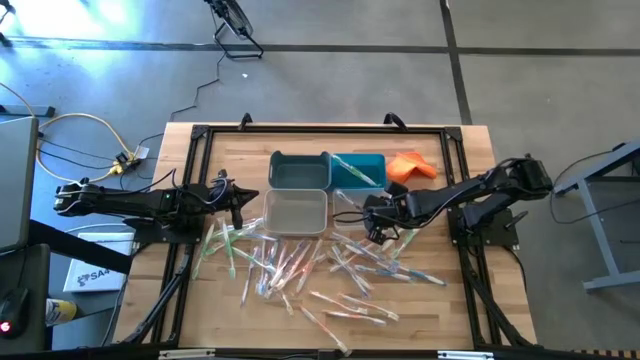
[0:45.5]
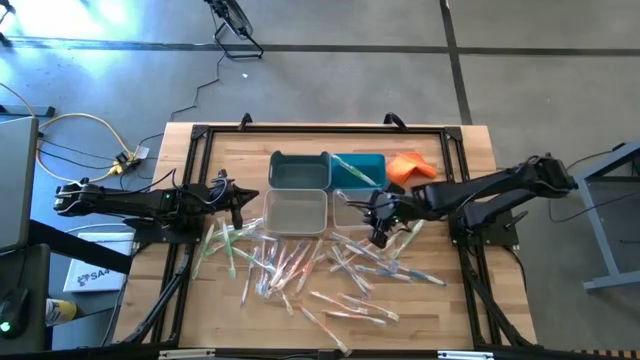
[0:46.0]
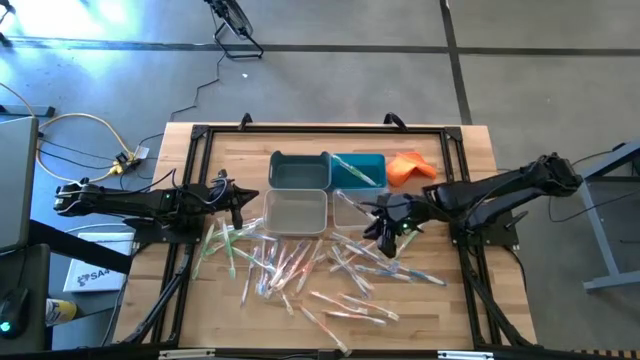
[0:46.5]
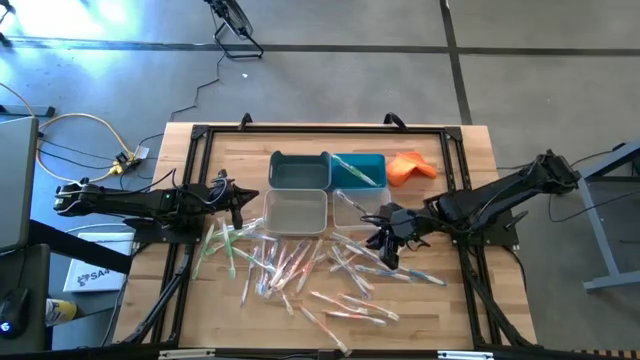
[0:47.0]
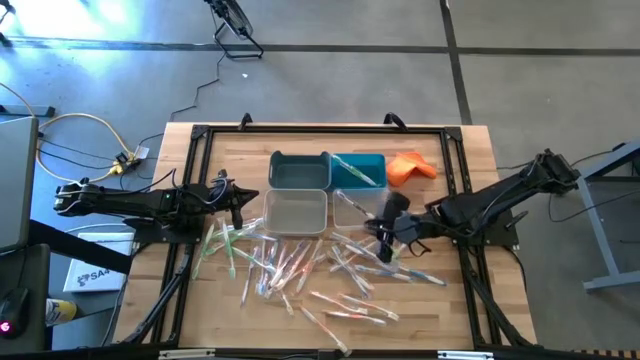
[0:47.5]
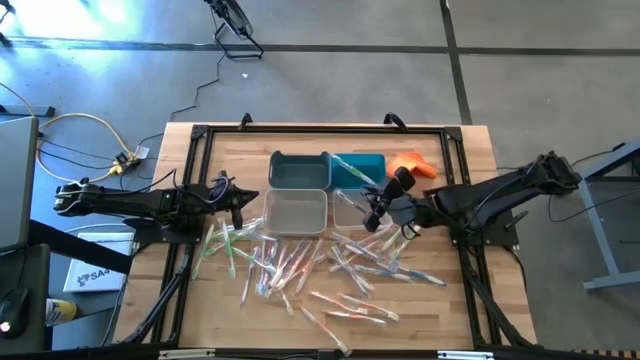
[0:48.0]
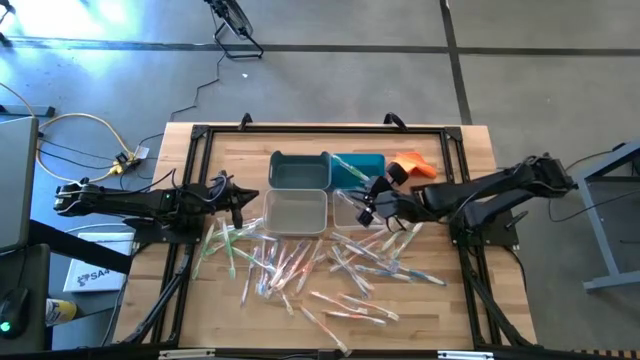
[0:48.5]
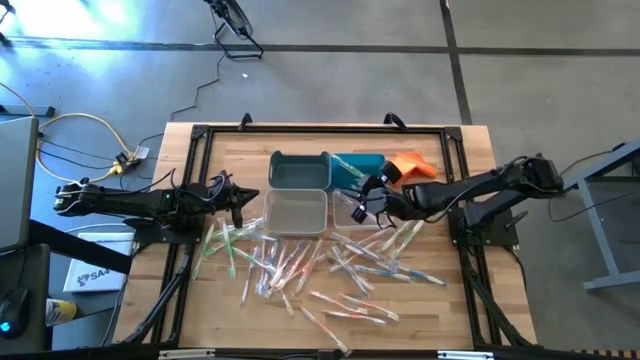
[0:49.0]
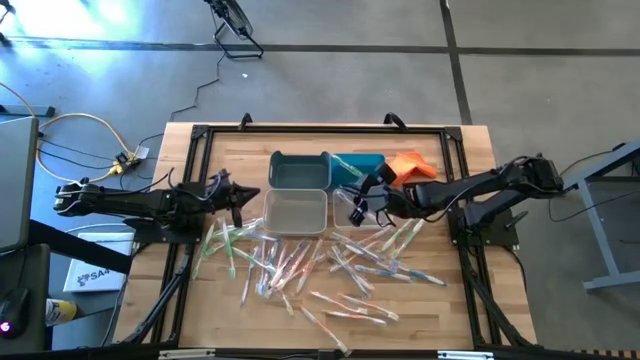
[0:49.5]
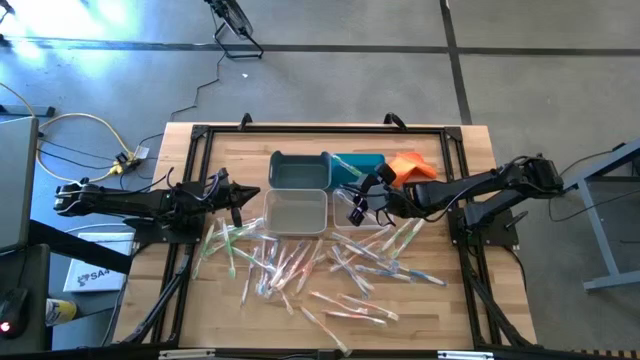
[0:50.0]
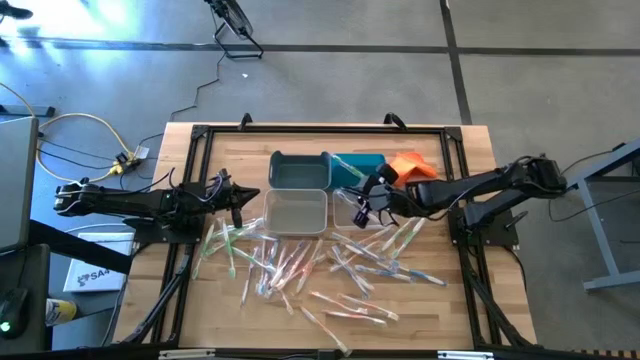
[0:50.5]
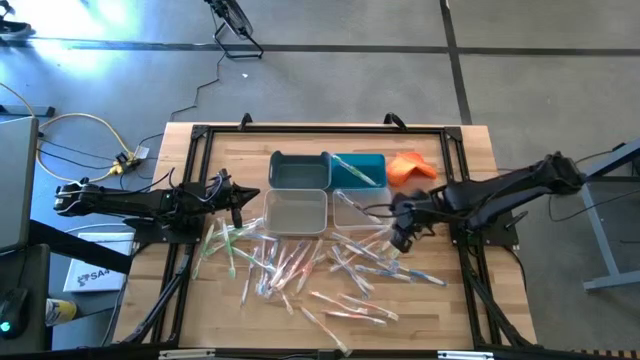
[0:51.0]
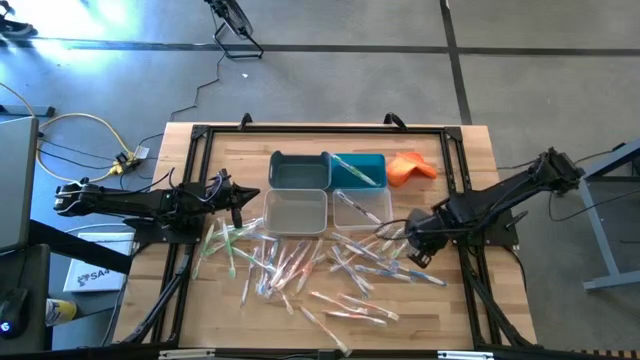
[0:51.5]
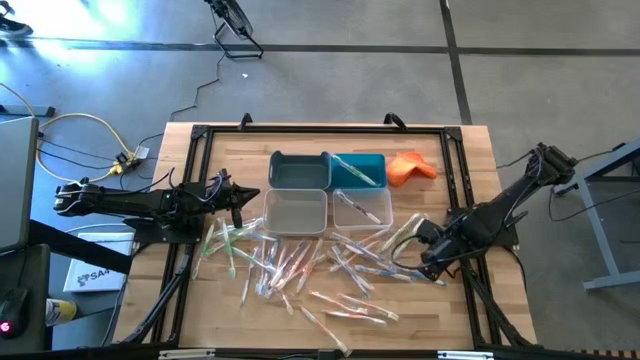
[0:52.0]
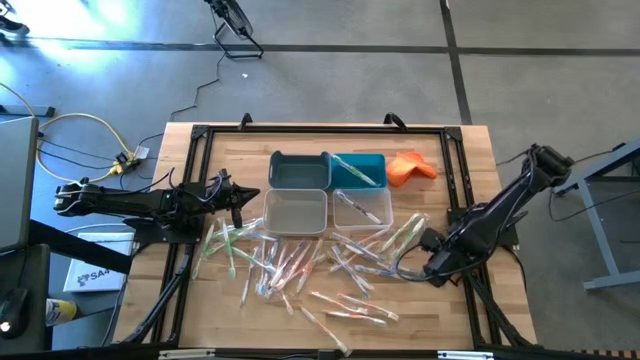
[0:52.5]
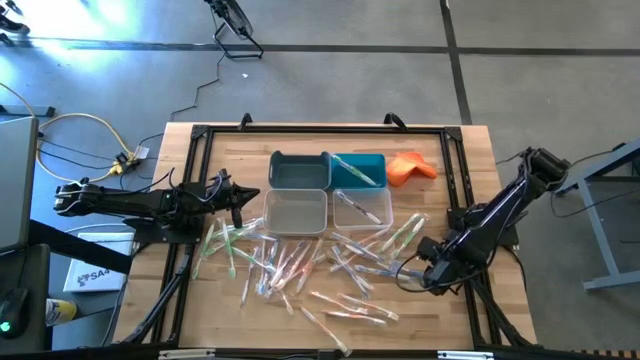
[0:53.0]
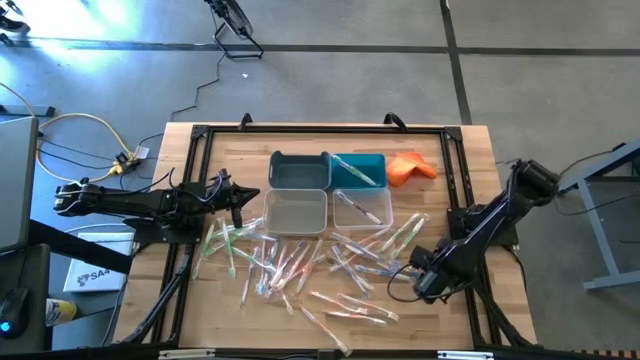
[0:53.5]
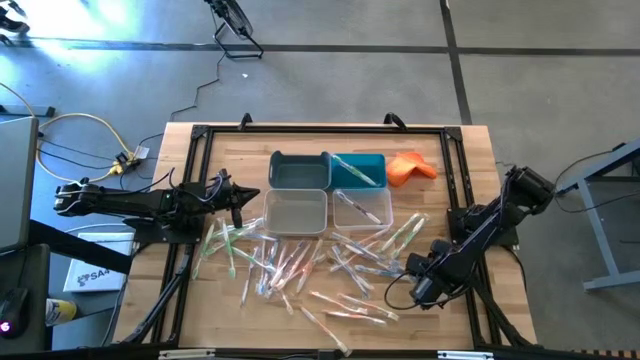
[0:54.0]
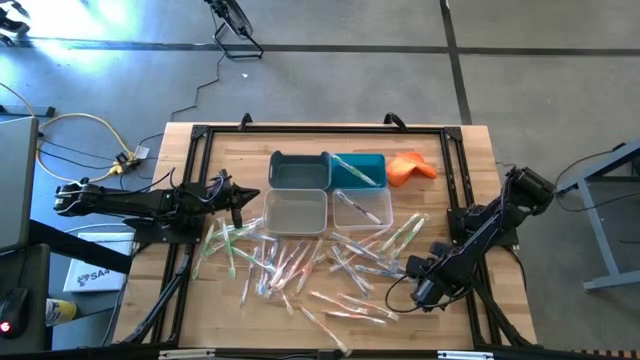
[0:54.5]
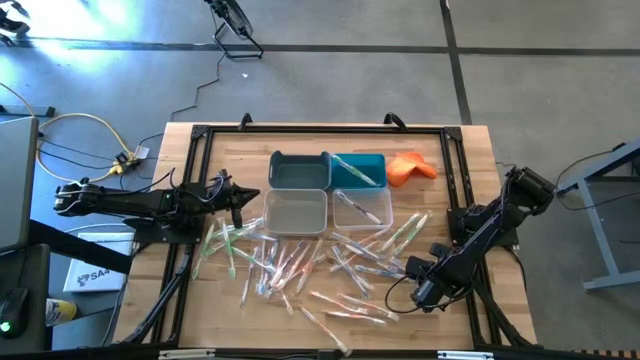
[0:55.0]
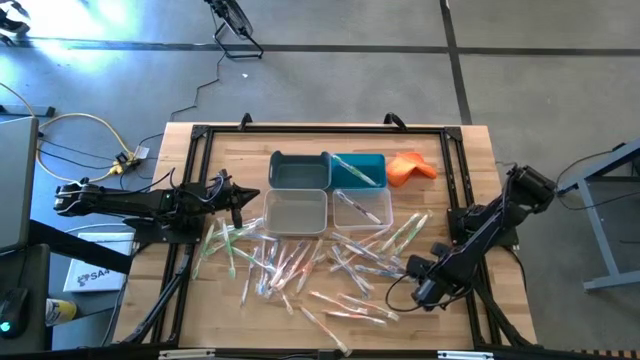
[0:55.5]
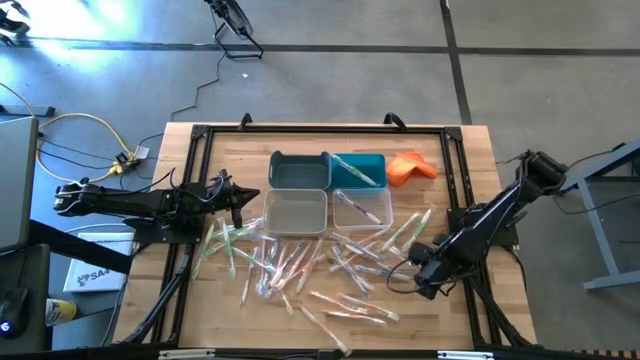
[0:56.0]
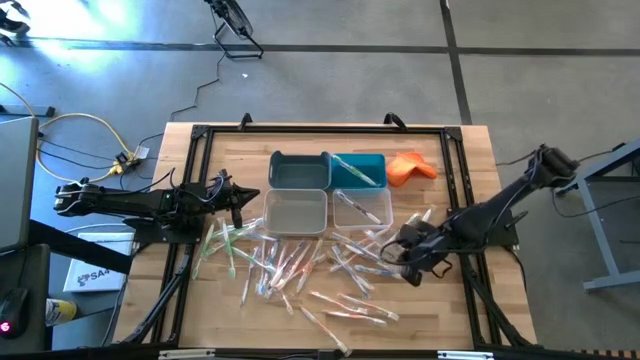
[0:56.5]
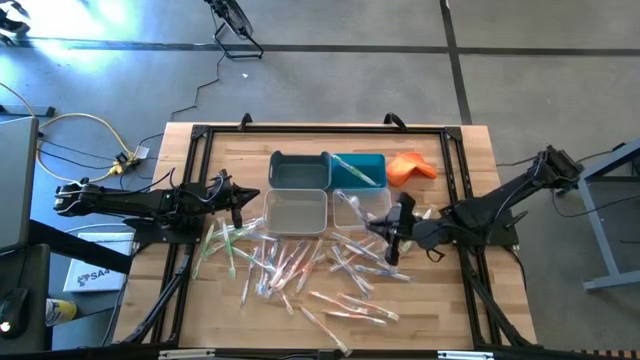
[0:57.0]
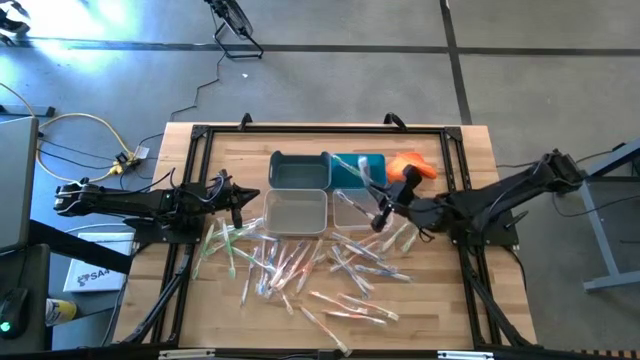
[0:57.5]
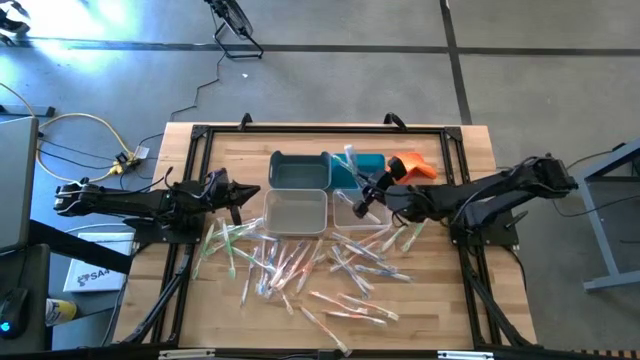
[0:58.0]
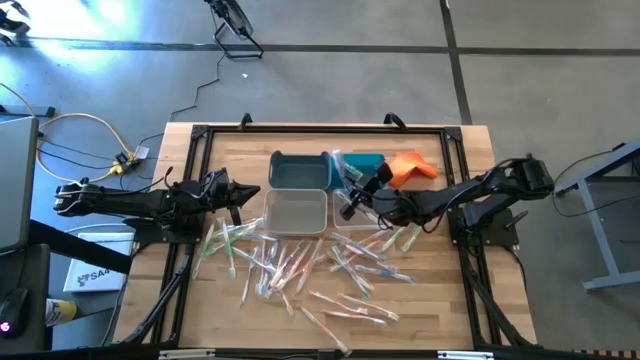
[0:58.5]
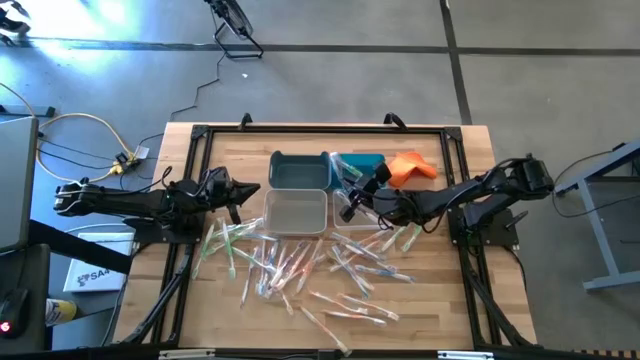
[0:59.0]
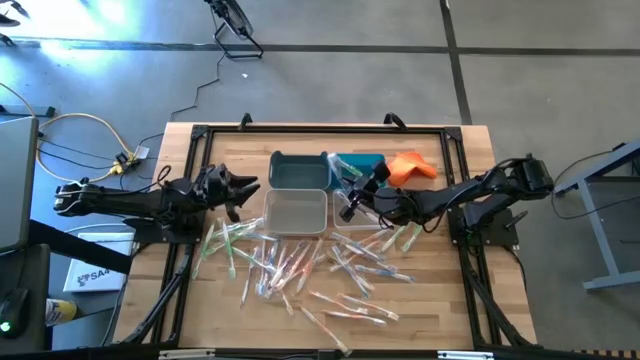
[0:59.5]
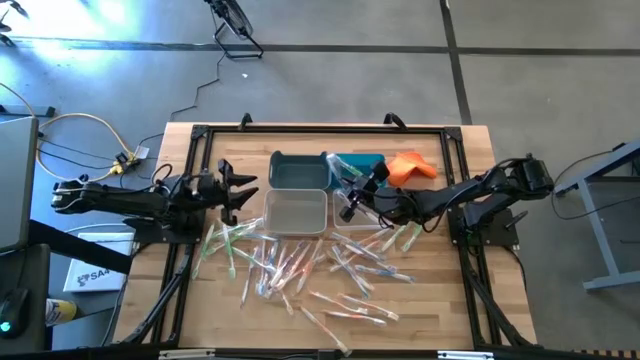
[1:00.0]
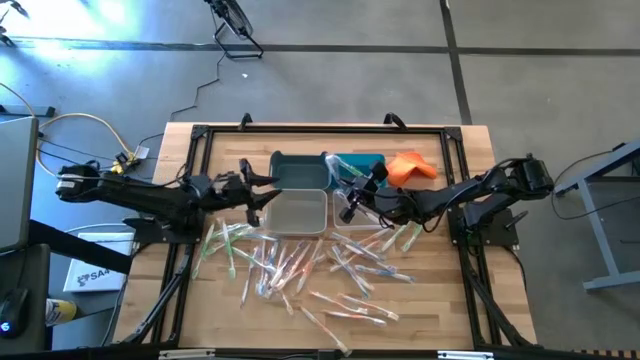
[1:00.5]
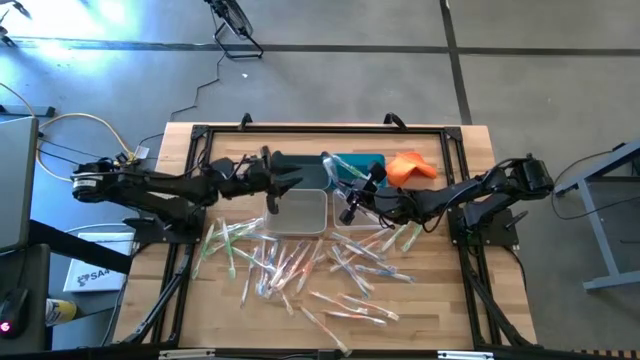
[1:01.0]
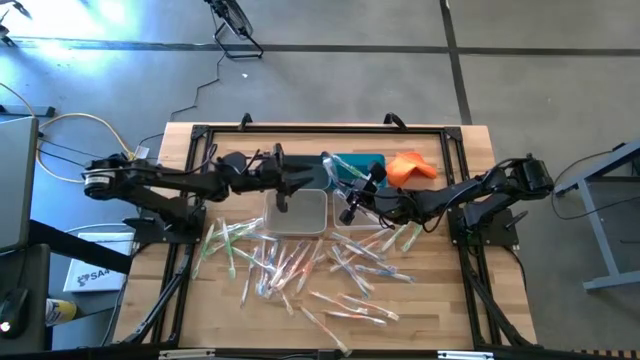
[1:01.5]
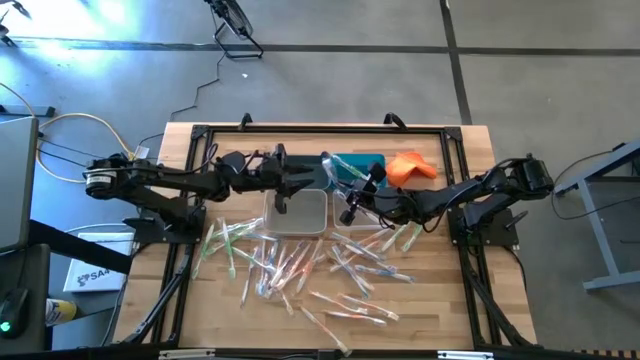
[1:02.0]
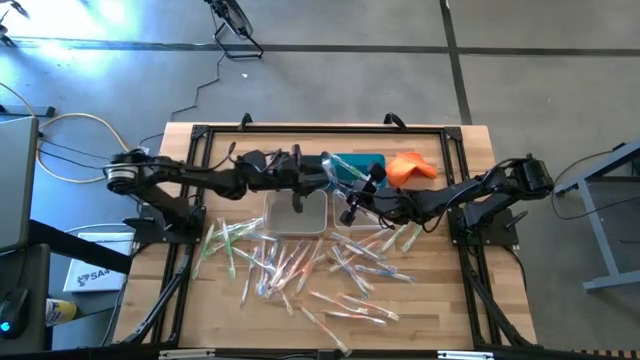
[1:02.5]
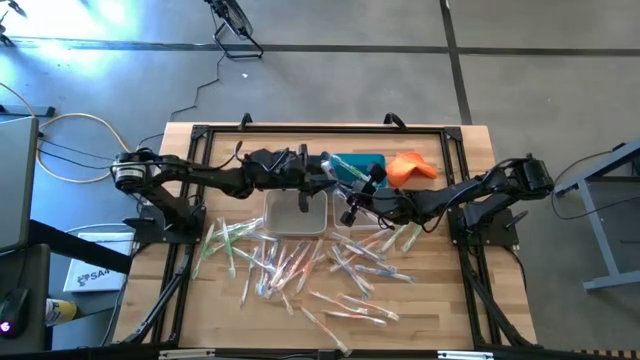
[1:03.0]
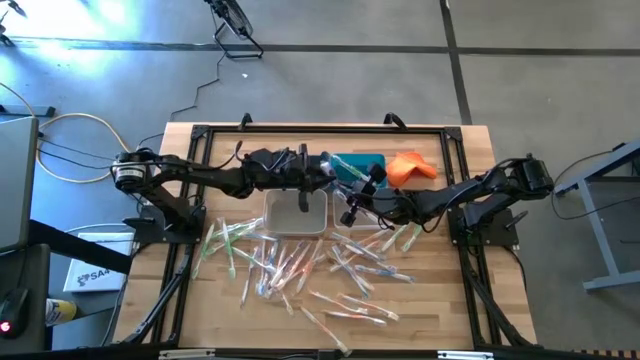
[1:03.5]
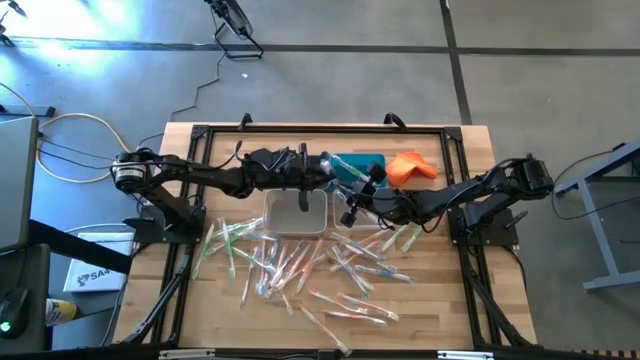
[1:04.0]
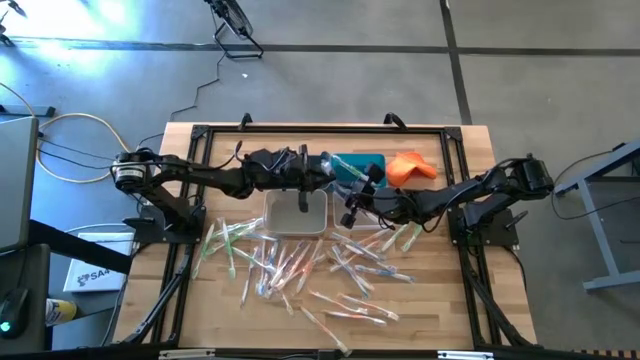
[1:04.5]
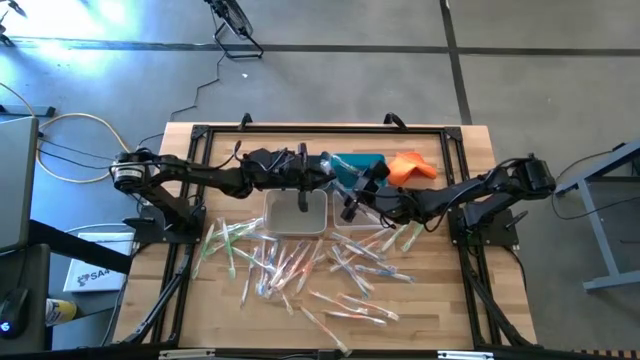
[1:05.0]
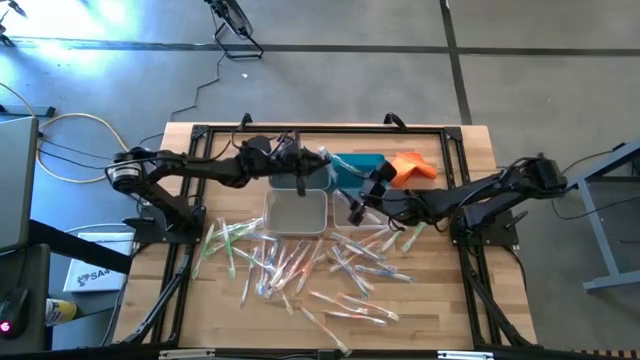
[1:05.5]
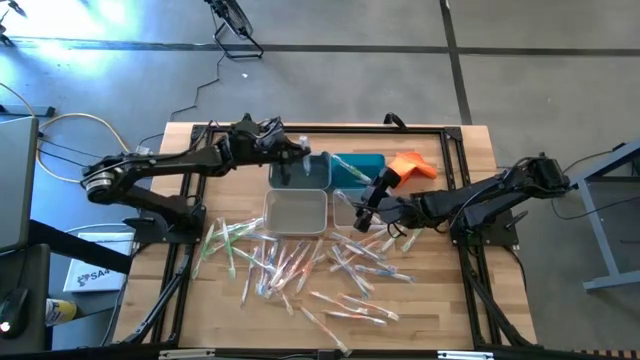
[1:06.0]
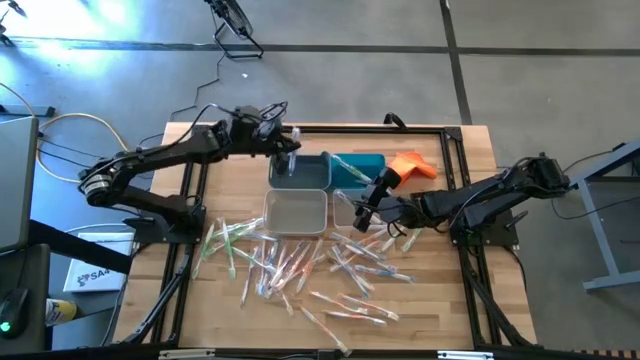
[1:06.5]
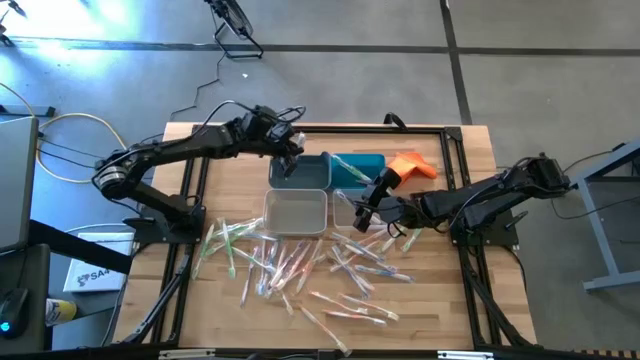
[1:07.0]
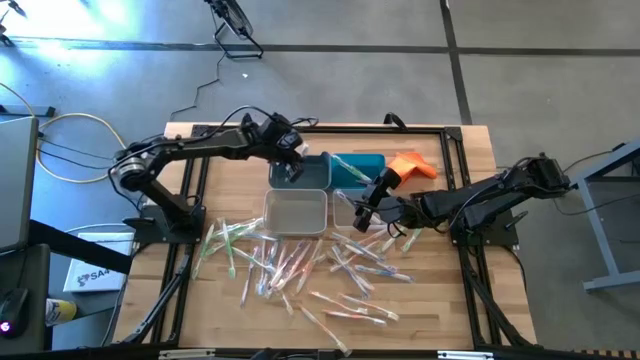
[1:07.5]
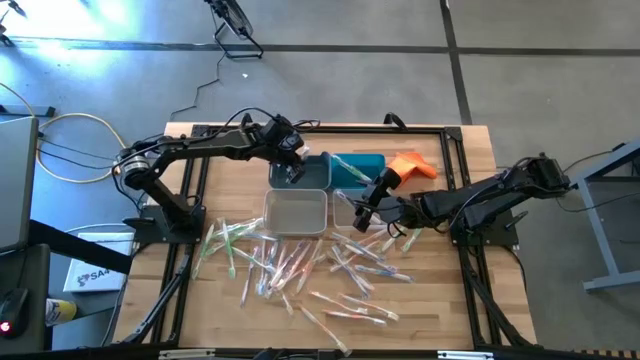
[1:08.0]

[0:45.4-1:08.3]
Task: Pick & Place Toothbrushes
Put the blue toothbrush into the dark blue bin
